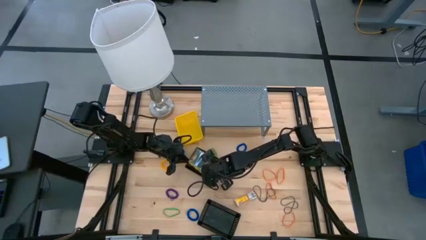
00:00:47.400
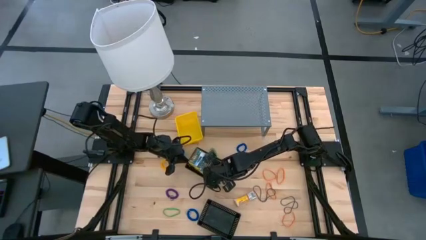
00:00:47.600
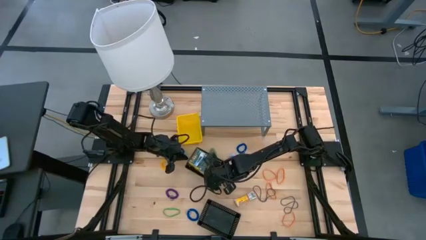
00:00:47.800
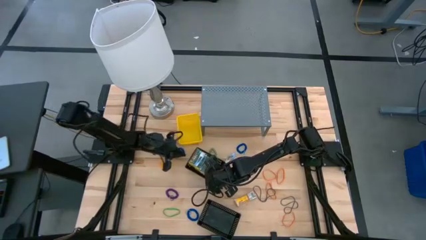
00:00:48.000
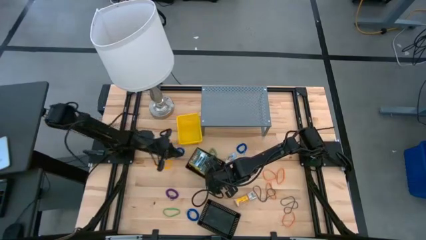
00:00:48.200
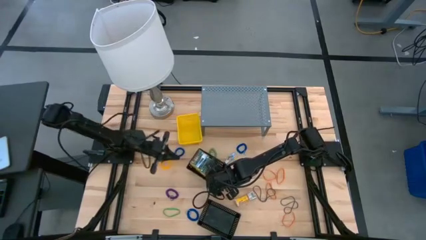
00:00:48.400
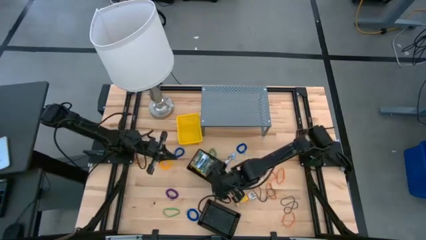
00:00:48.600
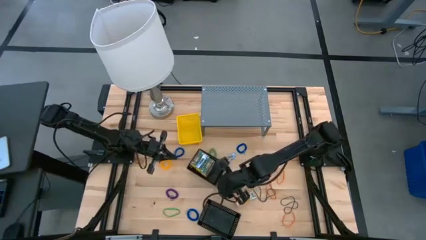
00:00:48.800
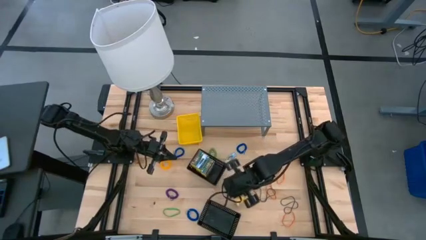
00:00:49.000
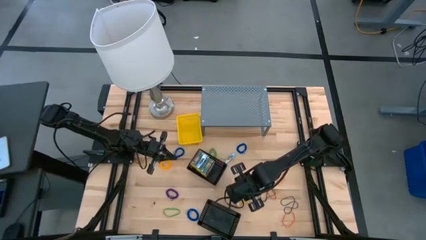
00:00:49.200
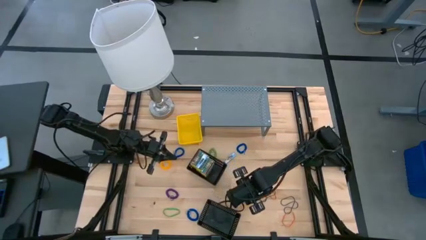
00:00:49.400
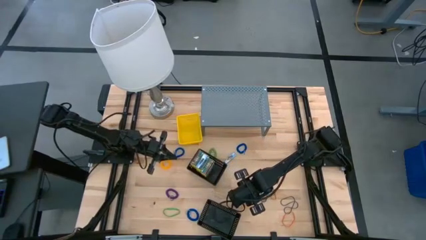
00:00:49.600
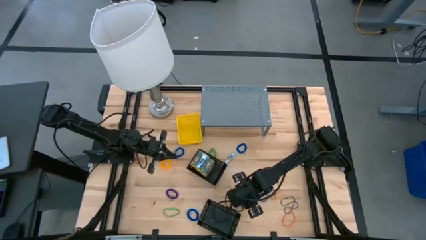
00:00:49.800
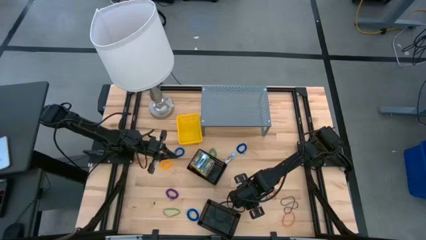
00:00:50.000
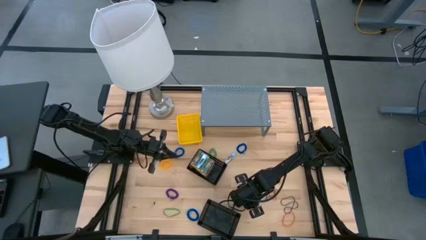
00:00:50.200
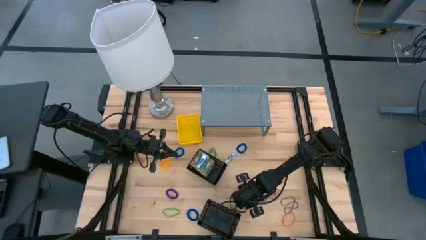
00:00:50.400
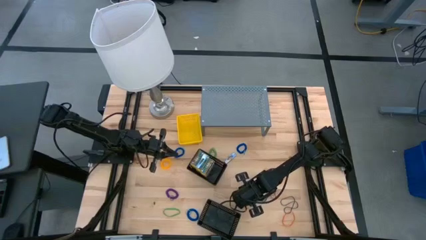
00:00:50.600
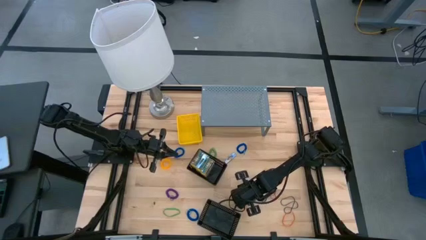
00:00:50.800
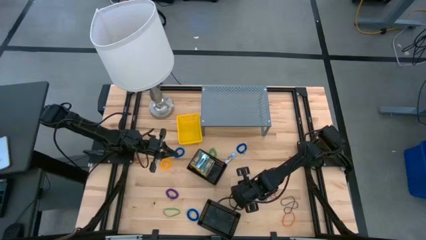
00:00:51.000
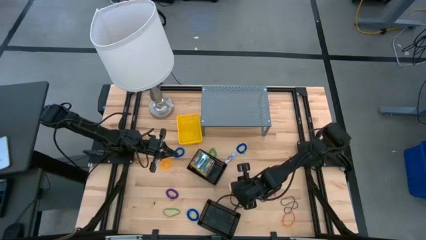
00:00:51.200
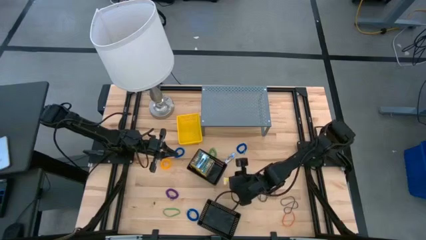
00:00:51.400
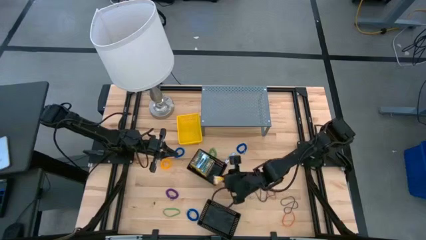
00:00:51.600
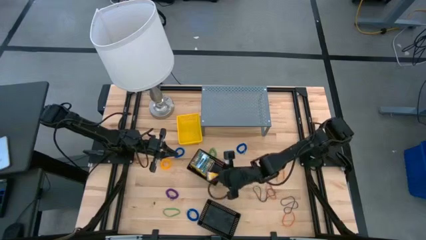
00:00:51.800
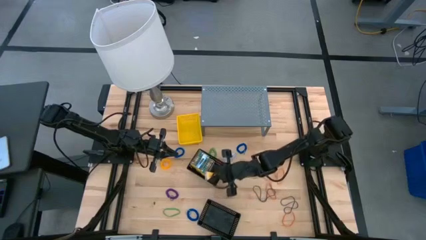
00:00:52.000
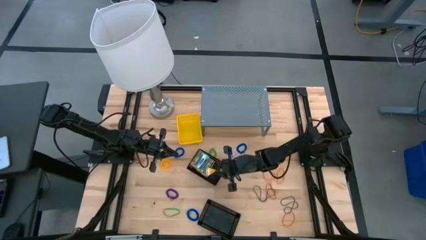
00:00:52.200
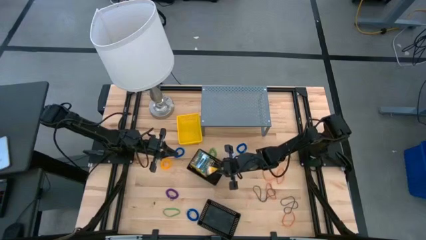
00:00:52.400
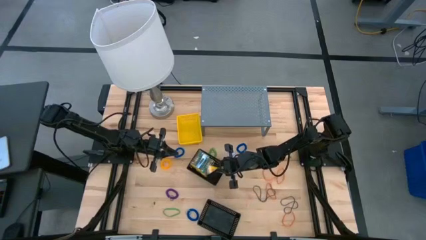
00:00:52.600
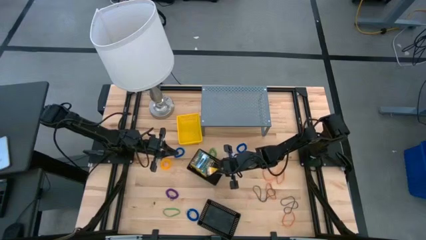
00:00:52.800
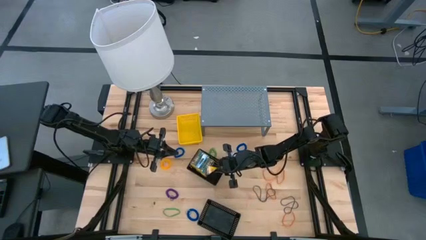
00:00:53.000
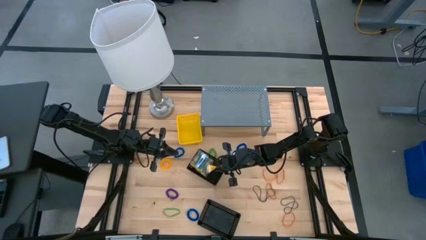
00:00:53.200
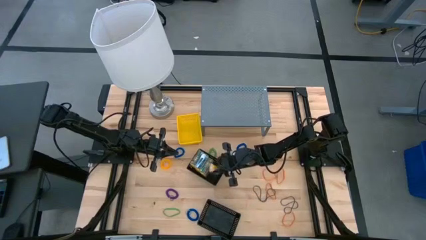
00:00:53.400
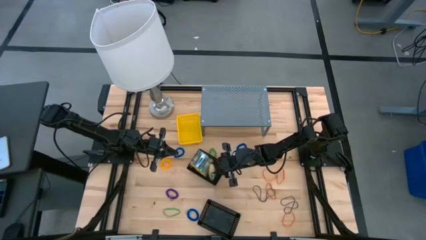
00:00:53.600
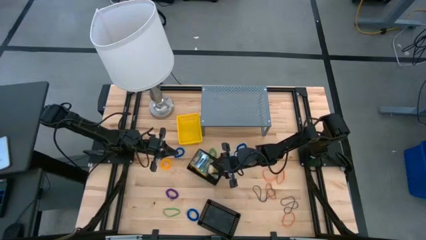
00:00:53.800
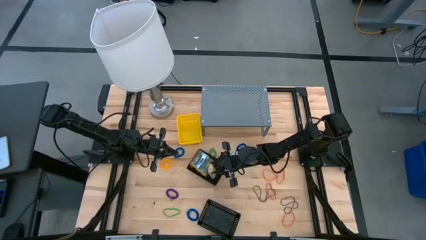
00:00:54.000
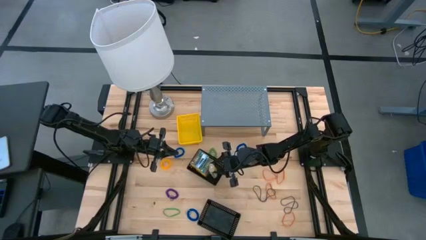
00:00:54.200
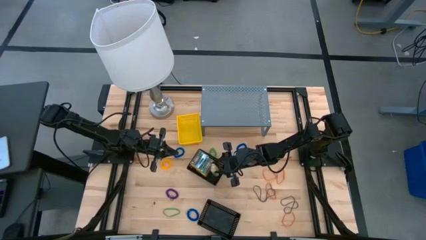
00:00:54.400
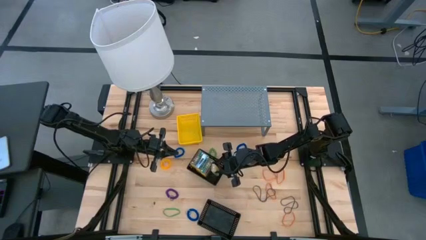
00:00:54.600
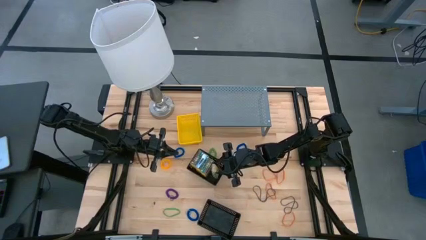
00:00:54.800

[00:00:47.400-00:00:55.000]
Task: Pick & Place Office Desk Supplies
Put the small yellow crayon box into the top black bin

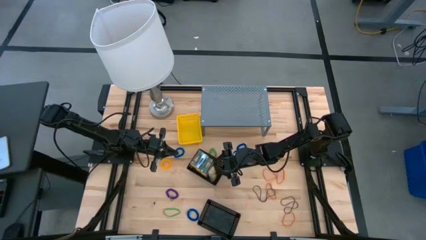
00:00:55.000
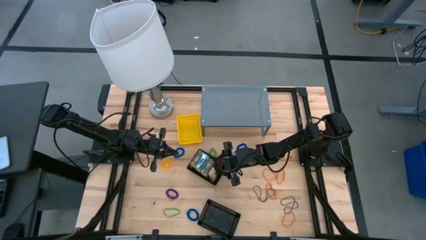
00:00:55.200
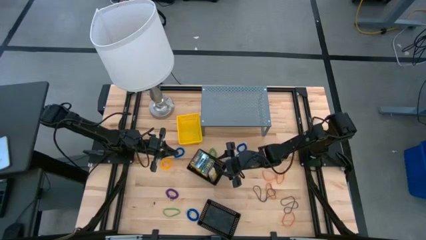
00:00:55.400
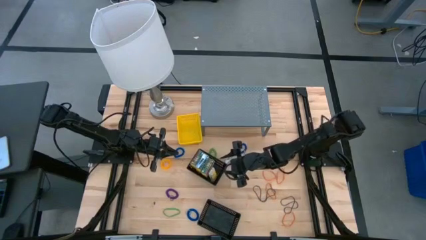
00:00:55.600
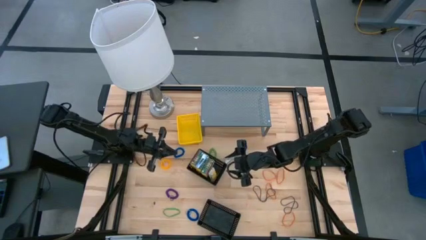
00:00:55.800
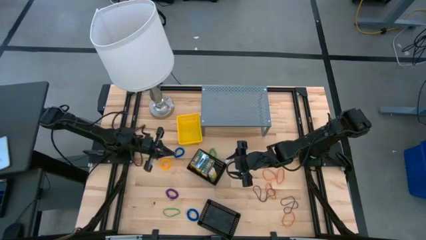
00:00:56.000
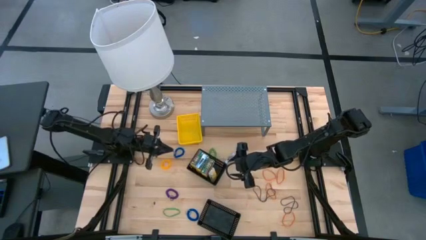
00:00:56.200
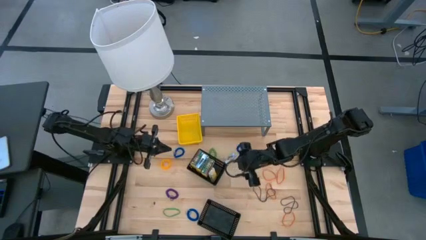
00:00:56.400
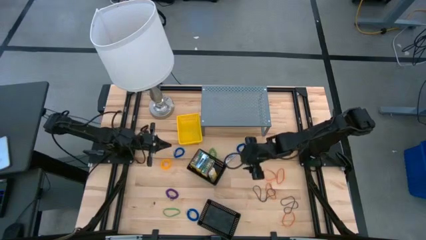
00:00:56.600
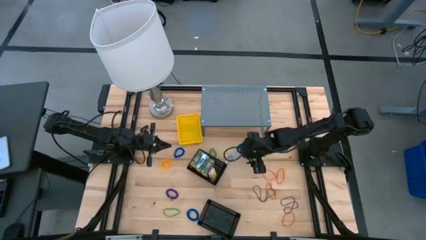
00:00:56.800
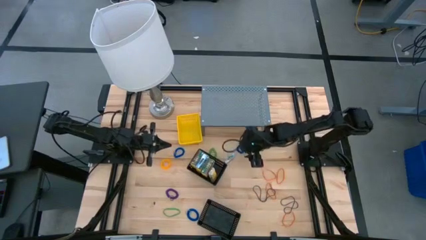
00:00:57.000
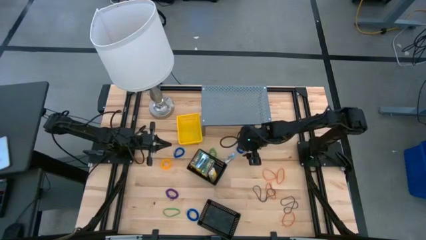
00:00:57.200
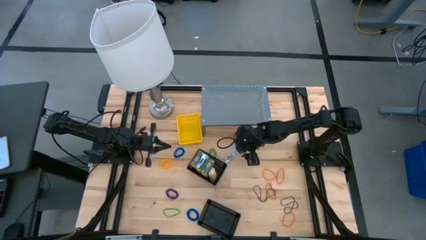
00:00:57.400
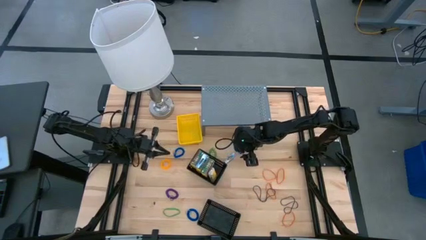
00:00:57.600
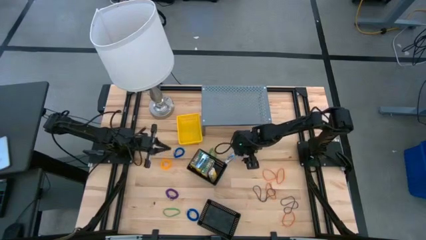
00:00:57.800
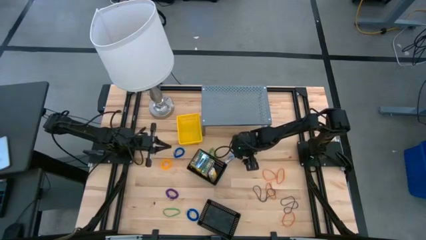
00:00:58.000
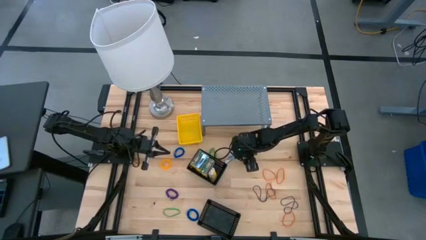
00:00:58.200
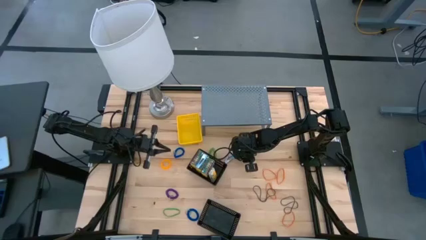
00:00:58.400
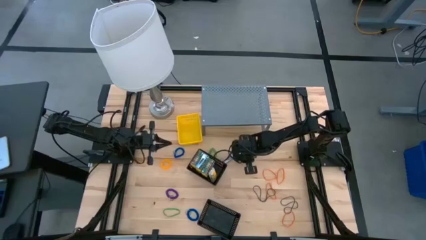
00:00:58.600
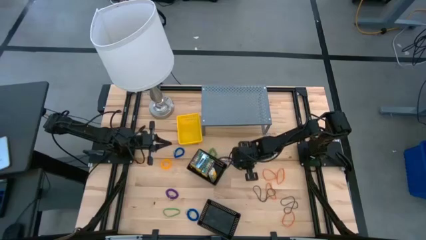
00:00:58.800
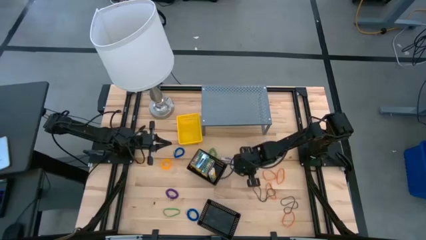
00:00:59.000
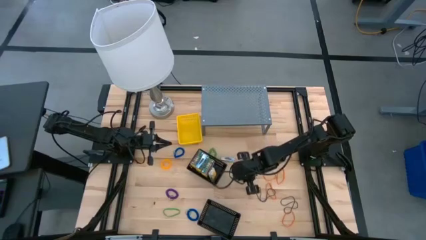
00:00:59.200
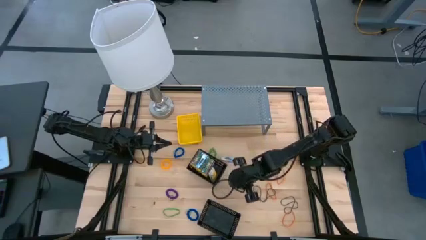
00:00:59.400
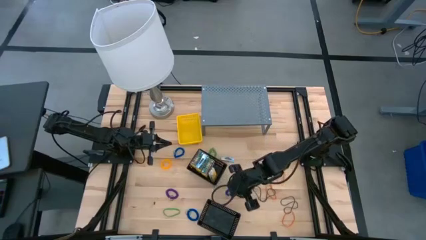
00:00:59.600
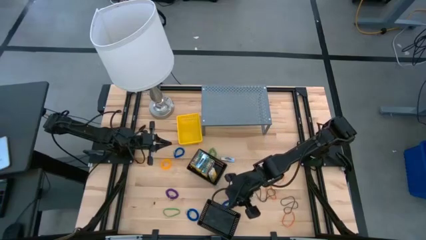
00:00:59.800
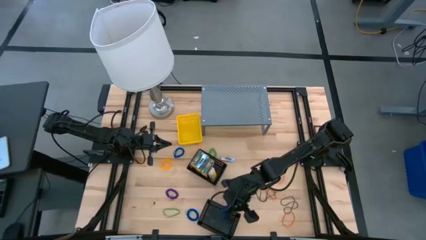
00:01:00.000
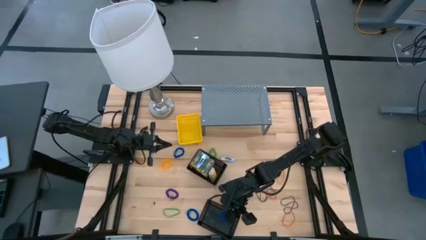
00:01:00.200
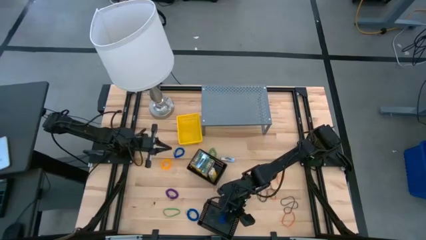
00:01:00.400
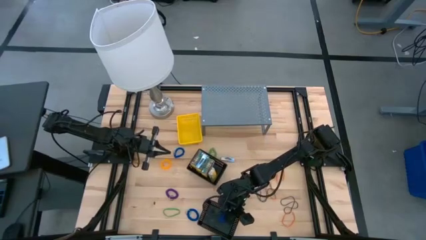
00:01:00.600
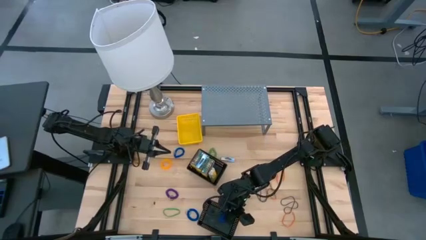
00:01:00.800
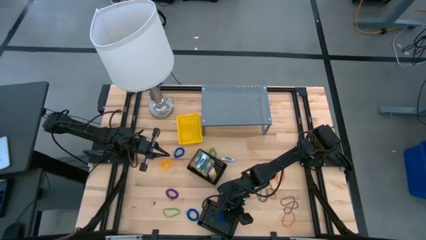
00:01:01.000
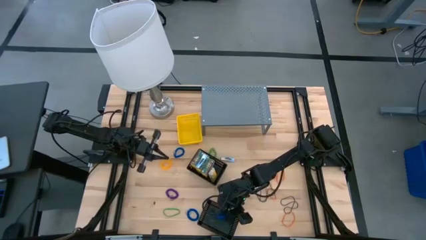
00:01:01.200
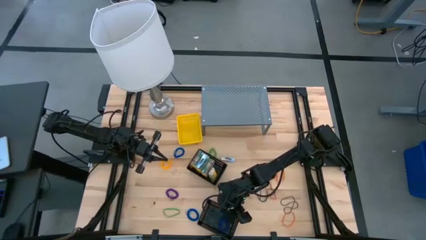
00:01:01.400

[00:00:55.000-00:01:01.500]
Put the top right blue spring keychain into the bottom black bin

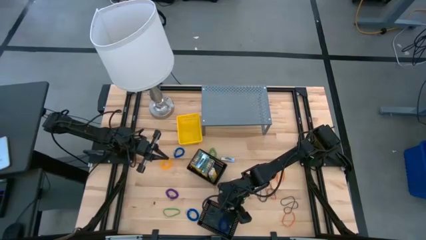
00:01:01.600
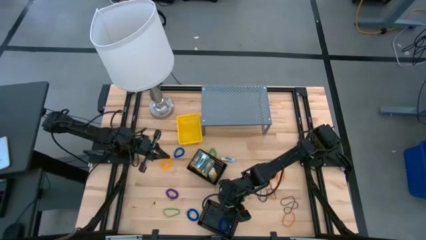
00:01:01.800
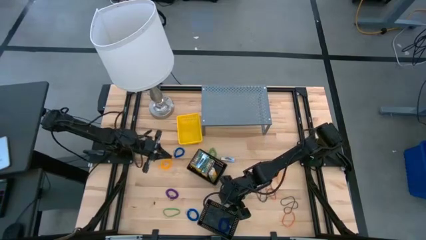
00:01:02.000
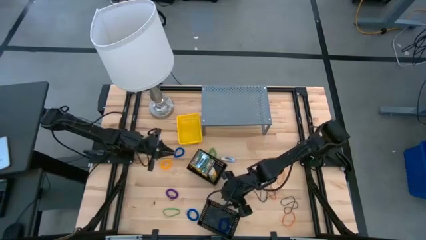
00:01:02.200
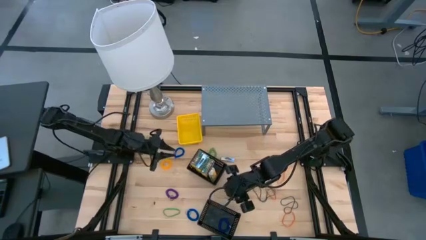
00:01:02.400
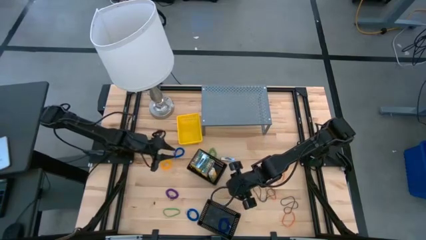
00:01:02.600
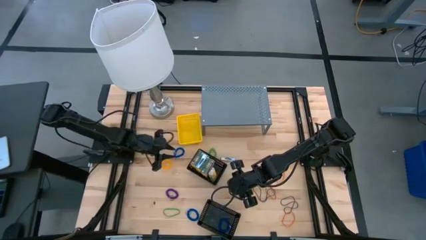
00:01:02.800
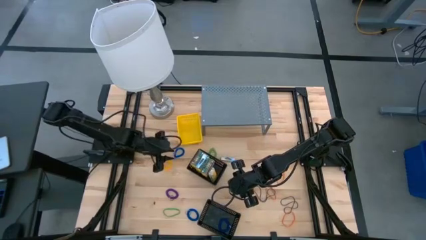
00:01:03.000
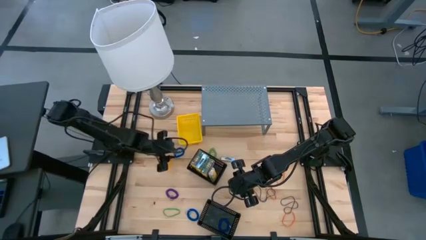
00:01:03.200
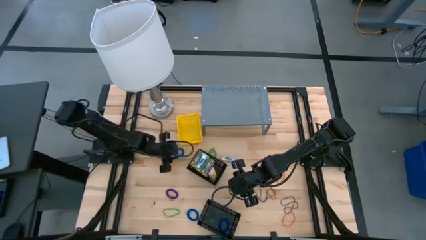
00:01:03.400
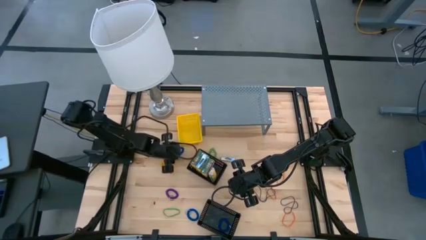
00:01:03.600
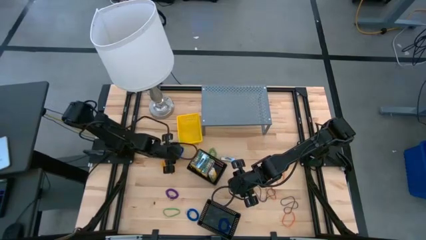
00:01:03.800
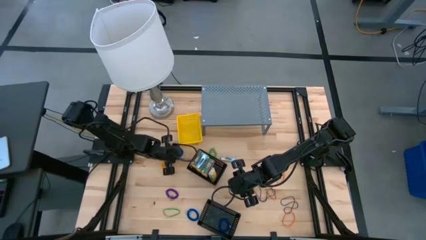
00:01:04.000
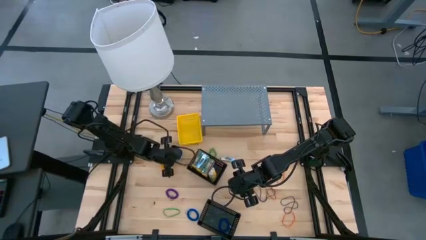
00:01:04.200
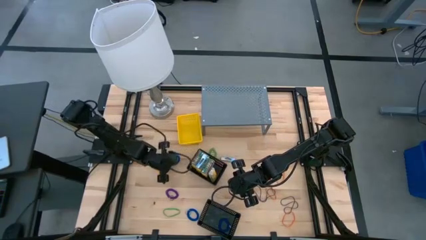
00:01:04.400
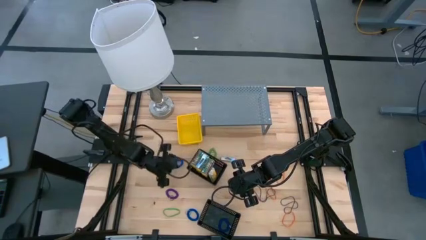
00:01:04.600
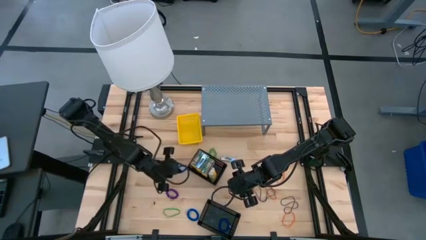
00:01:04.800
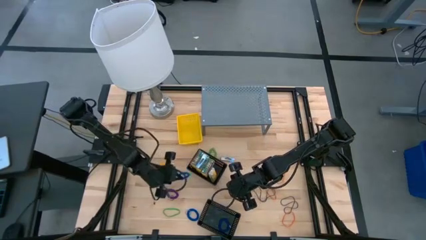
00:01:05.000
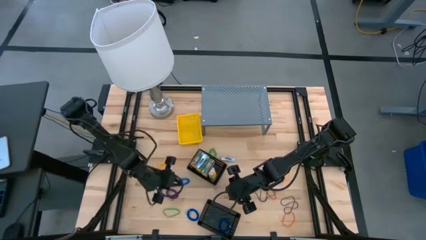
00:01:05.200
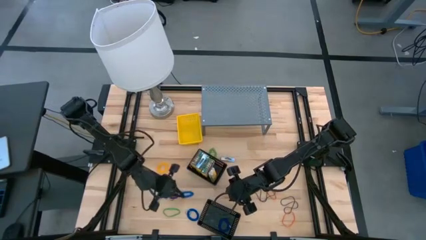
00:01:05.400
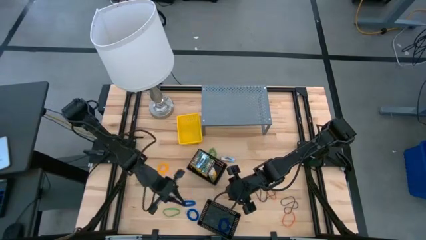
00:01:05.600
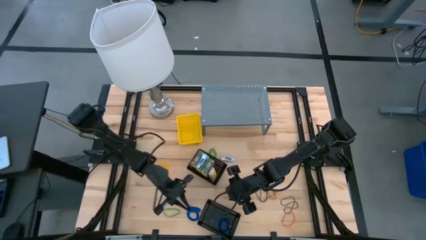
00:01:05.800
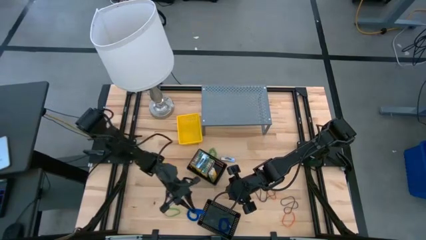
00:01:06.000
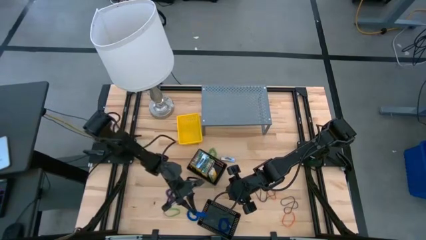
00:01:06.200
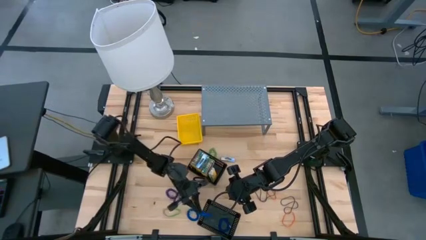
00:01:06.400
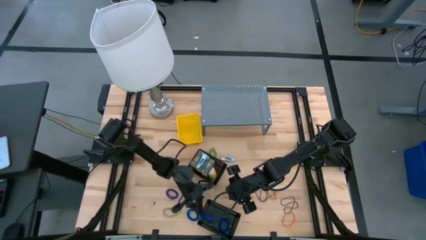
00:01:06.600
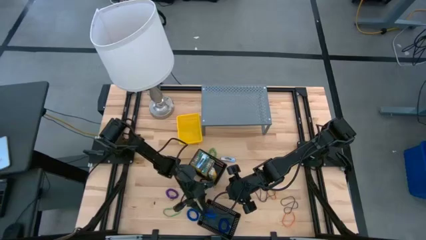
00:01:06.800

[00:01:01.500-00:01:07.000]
Put the top blue spring keychain into the bottom black bin
